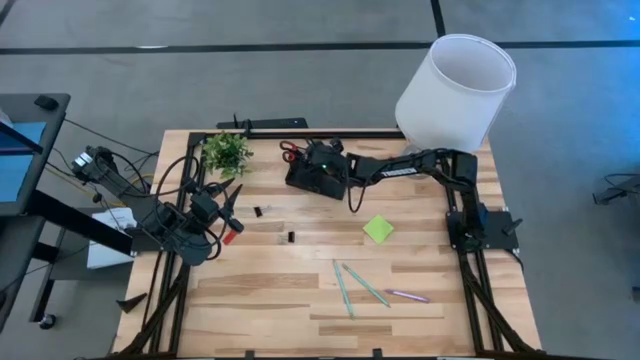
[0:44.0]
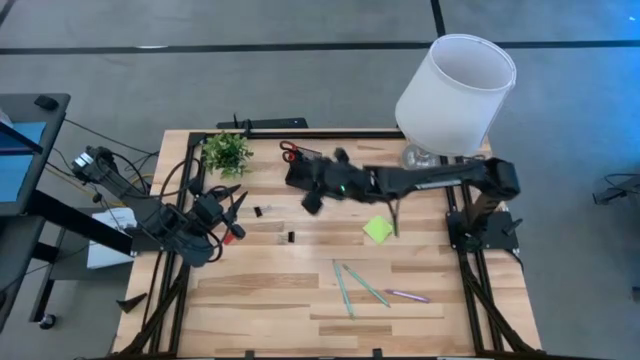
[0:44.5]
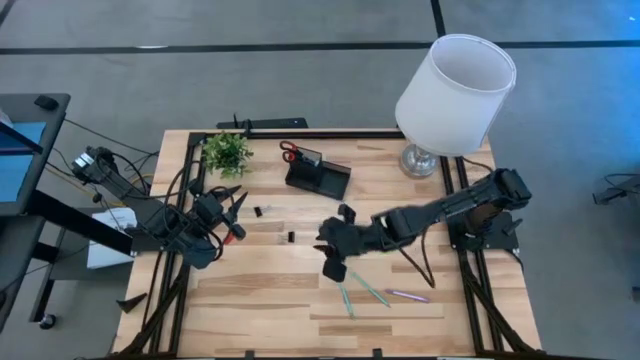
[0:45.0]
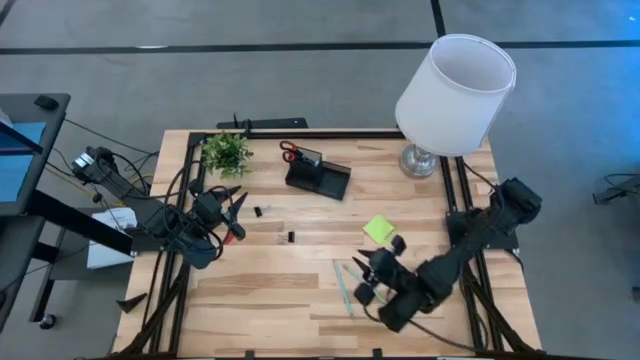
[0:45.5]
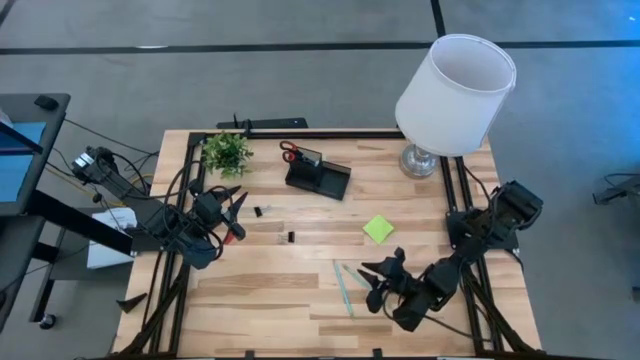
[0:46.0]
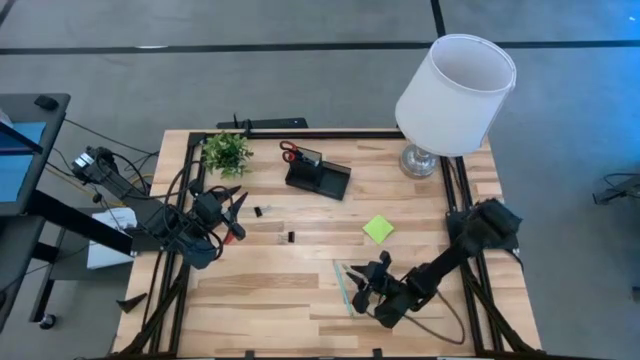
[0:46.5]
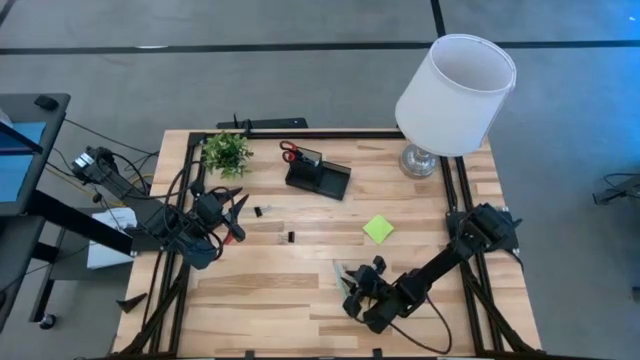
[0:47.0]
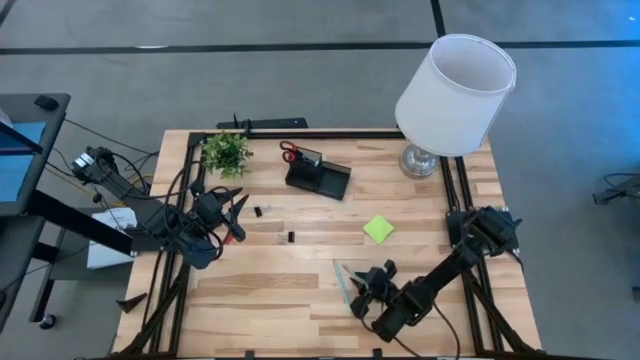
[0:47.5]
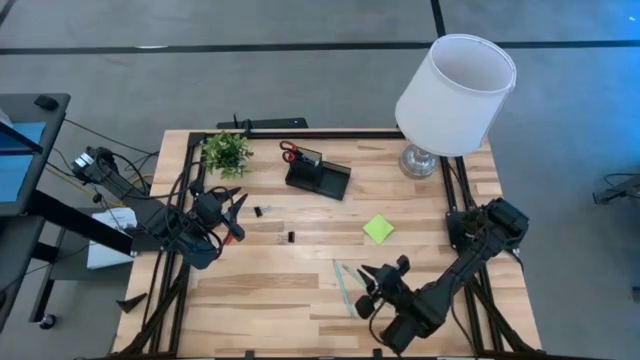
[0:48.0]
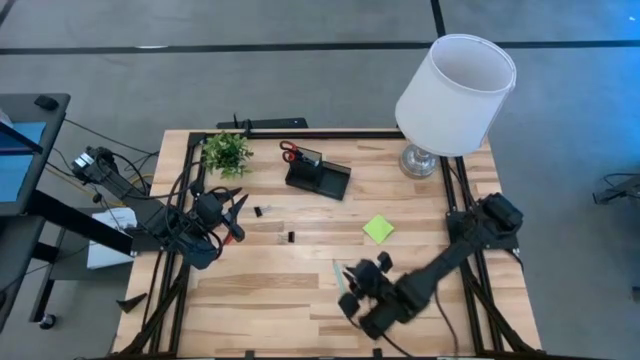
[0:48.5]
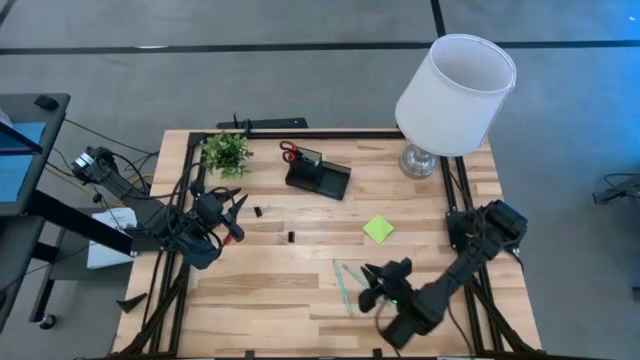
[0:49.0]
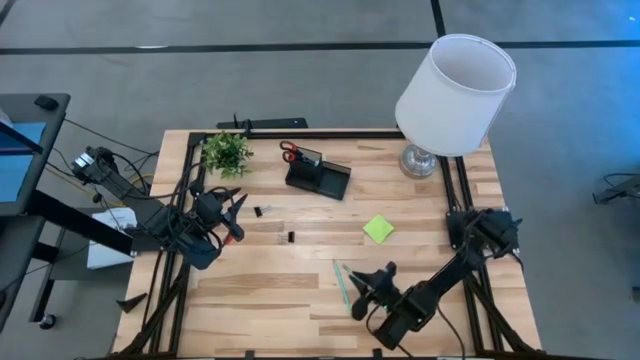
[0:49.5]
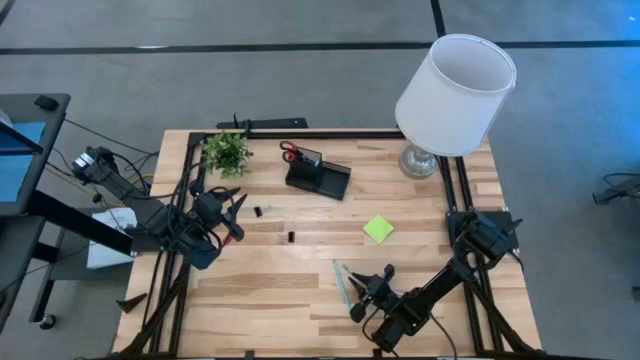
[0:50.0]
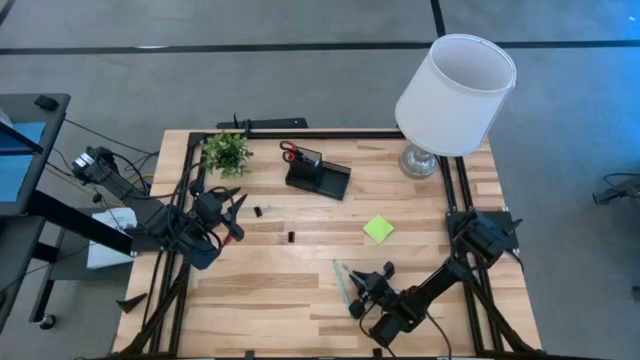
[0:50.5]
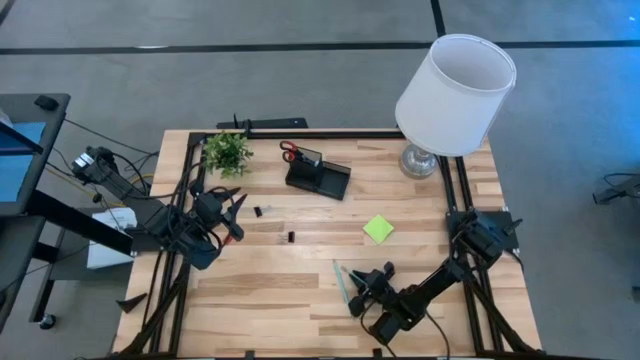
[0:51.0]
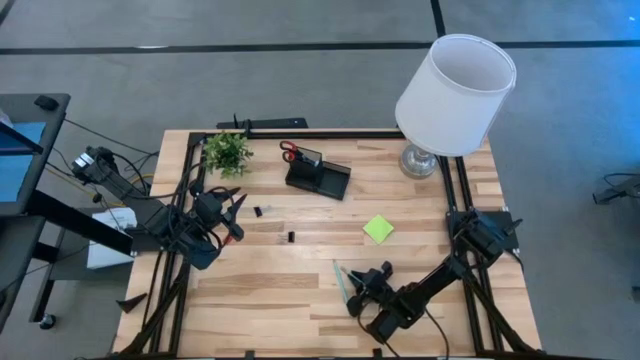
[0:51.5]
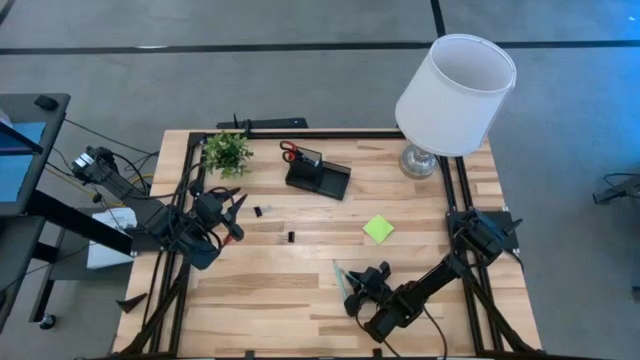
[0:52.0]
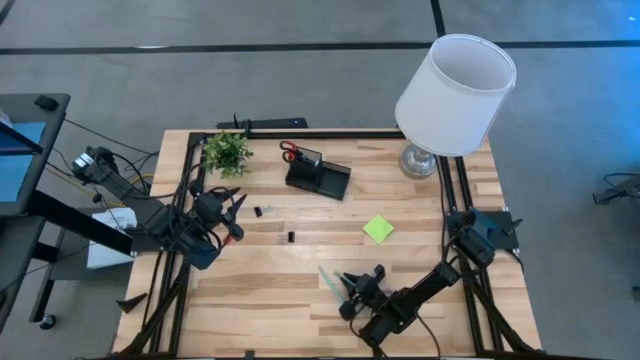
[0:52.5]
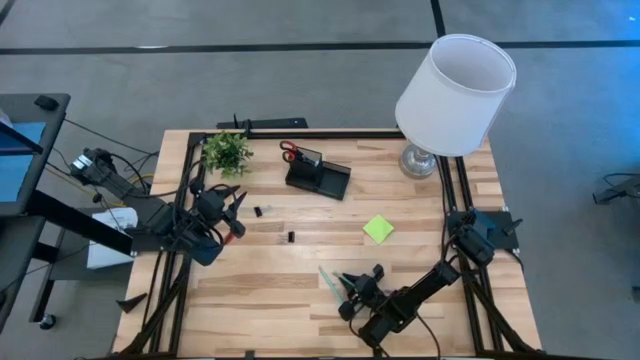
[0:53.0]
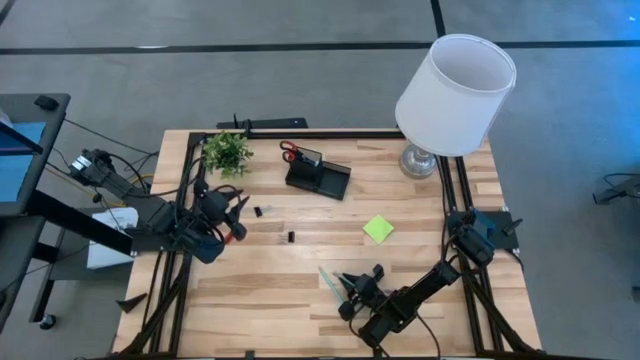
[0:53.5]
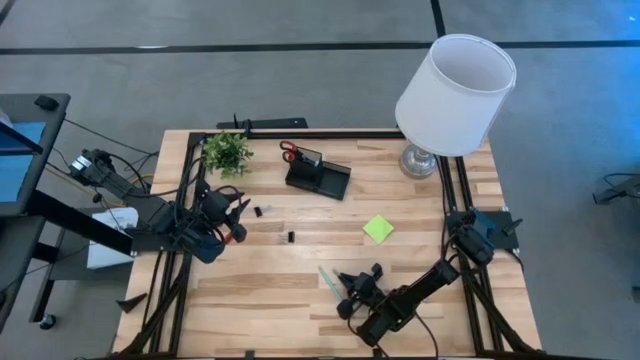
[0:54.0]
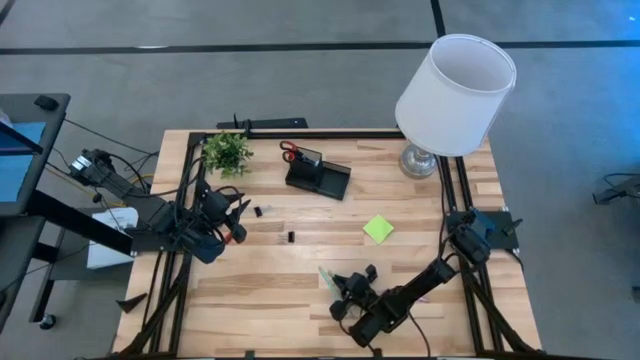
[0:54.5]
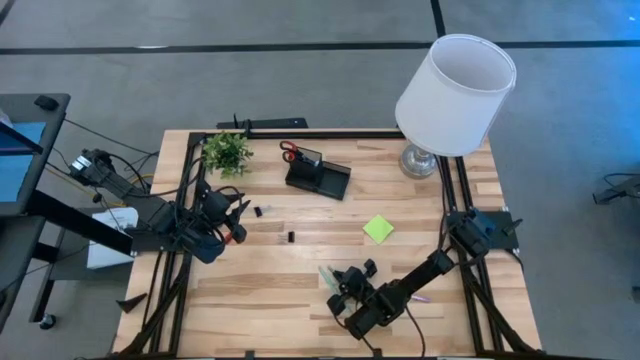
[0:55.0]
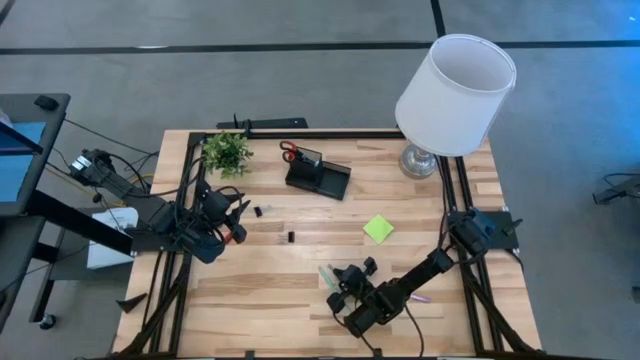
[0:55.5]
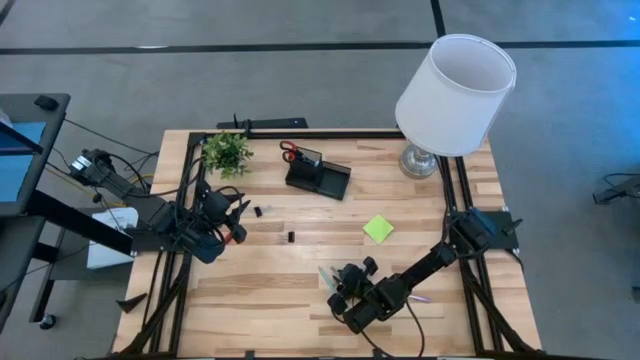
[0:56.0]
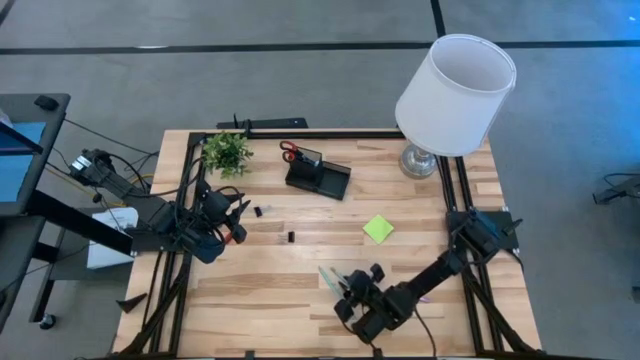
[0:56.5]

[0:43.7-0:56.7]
Task: Pick and place office supplies into organizer
Put the right blue pencil into the desk organizer
